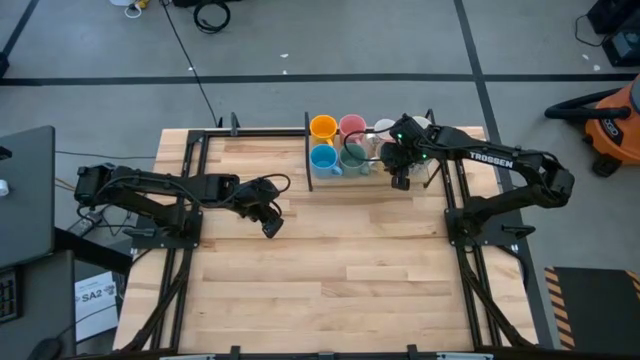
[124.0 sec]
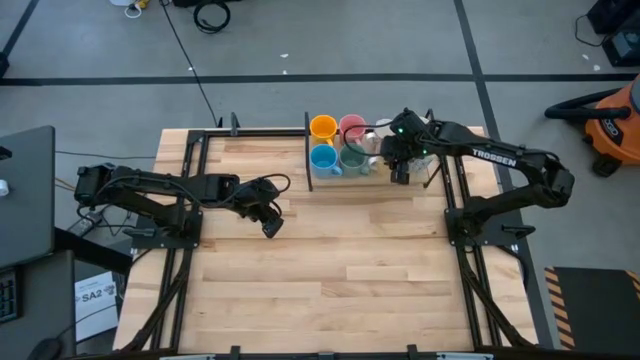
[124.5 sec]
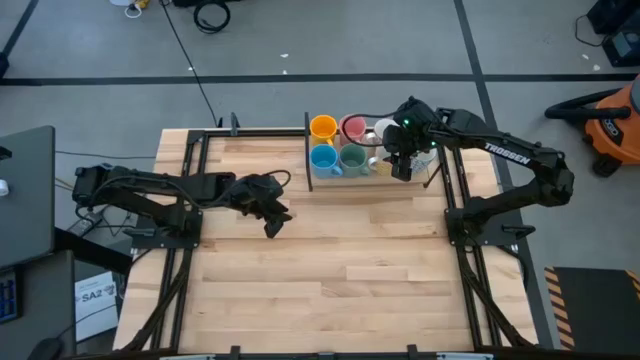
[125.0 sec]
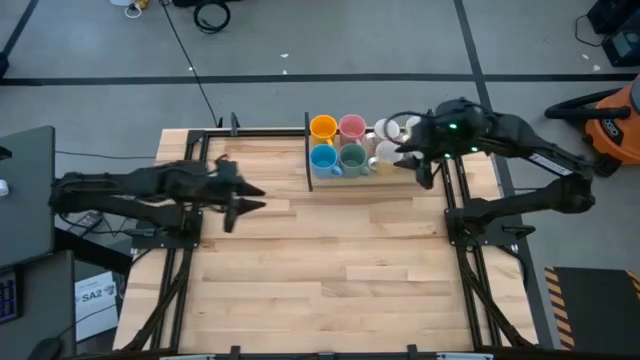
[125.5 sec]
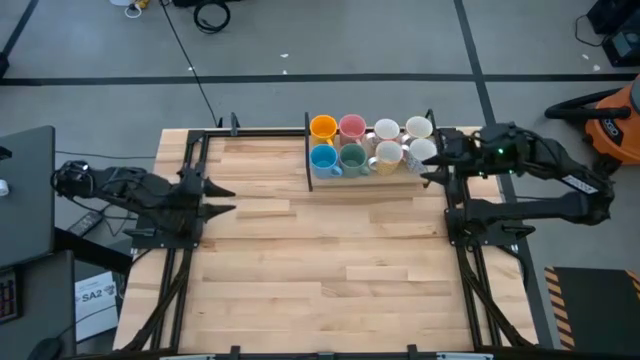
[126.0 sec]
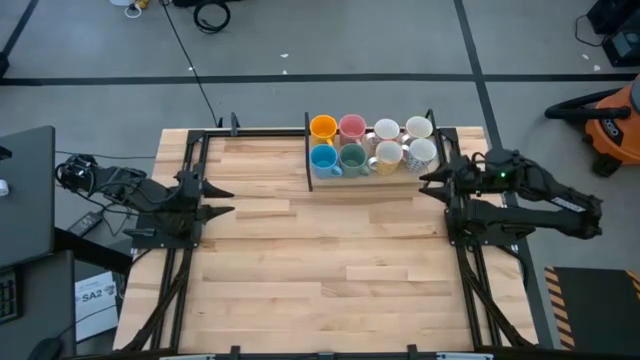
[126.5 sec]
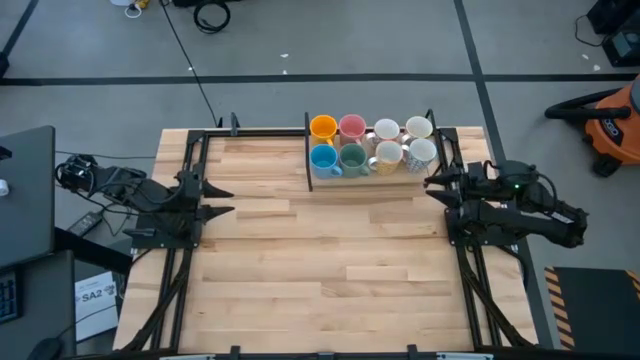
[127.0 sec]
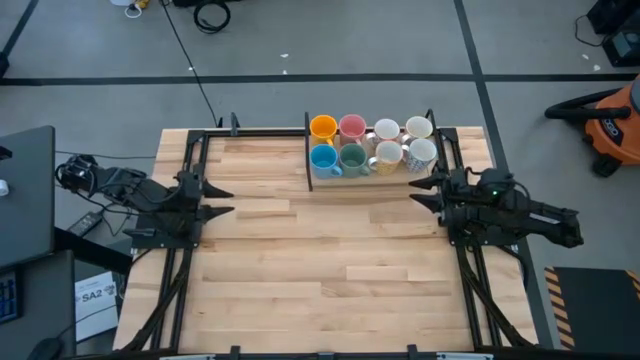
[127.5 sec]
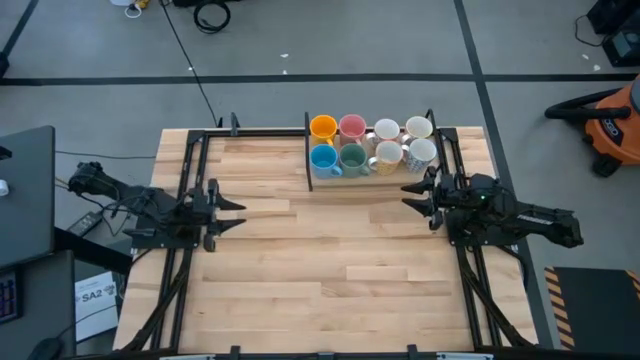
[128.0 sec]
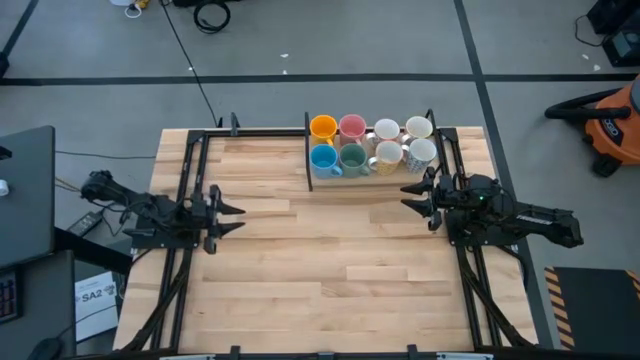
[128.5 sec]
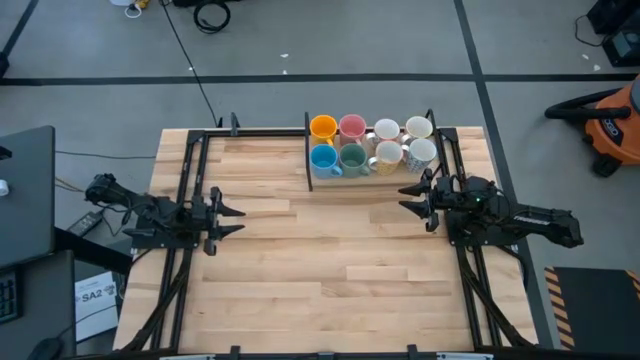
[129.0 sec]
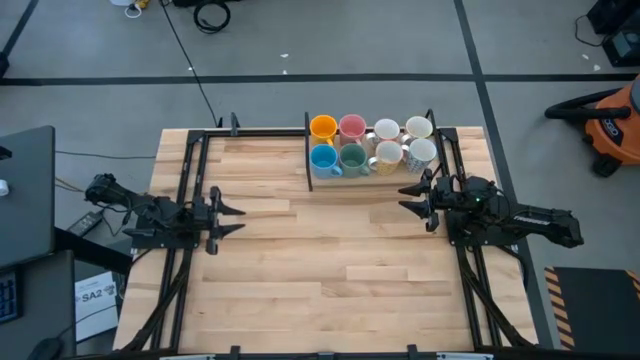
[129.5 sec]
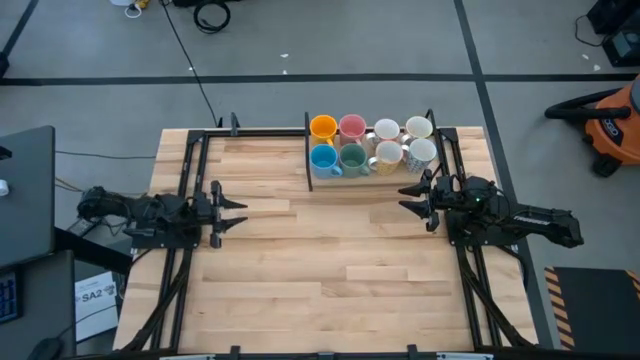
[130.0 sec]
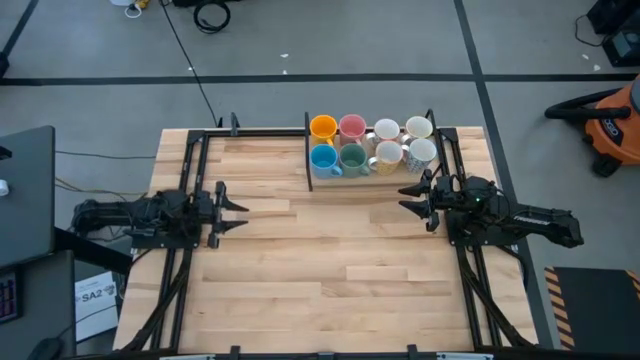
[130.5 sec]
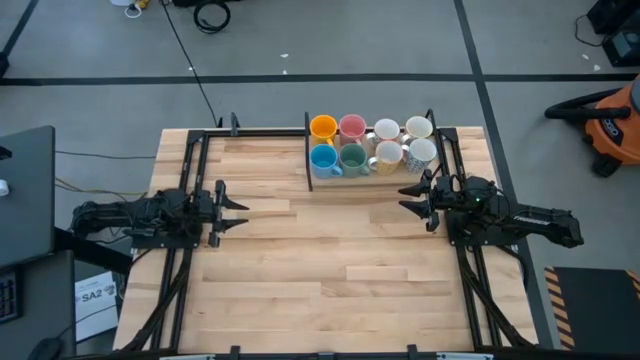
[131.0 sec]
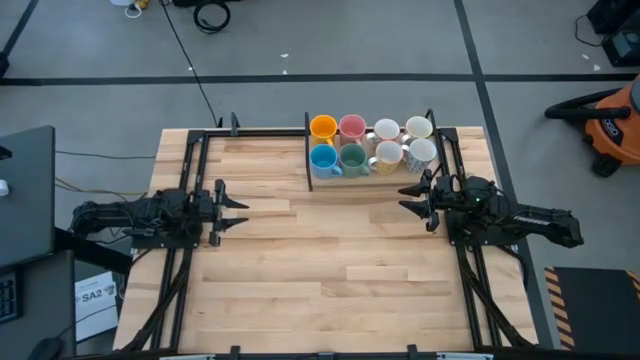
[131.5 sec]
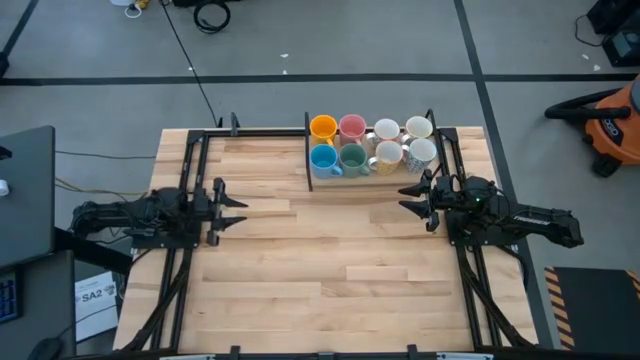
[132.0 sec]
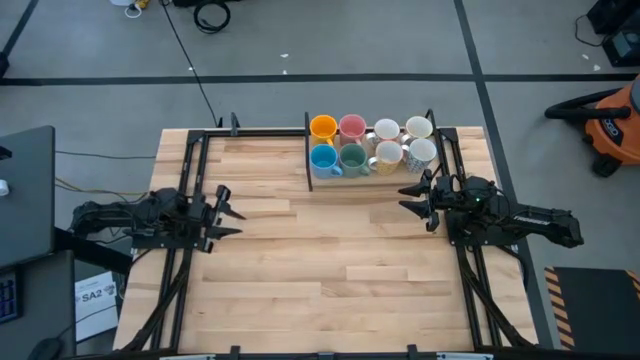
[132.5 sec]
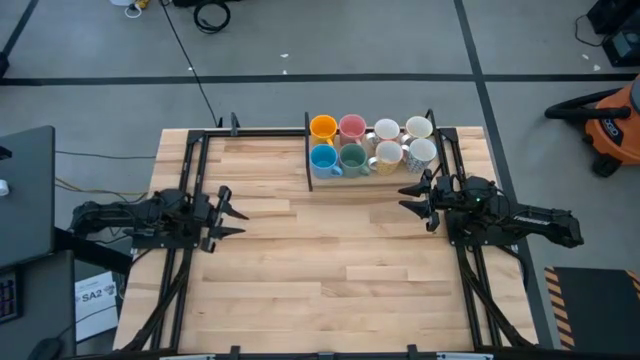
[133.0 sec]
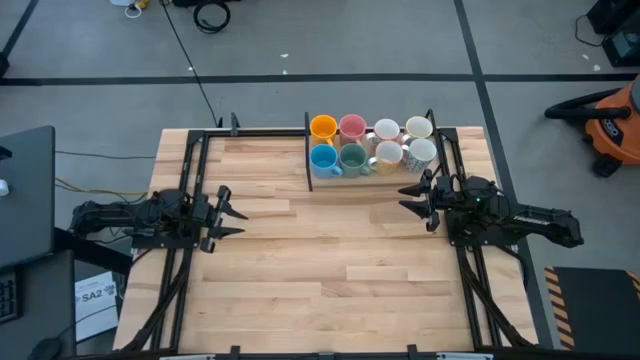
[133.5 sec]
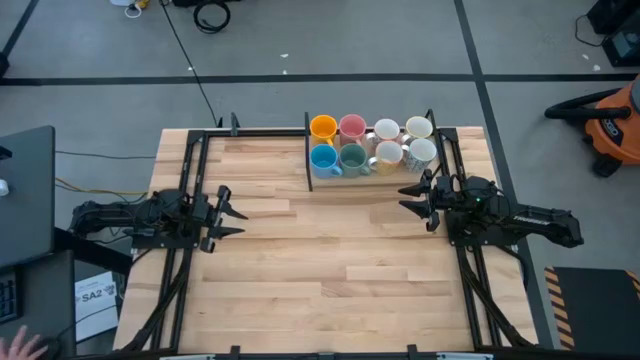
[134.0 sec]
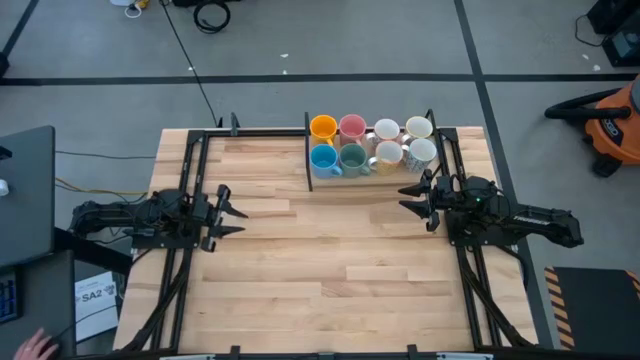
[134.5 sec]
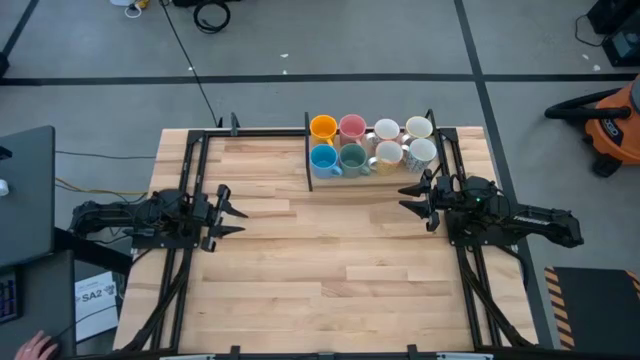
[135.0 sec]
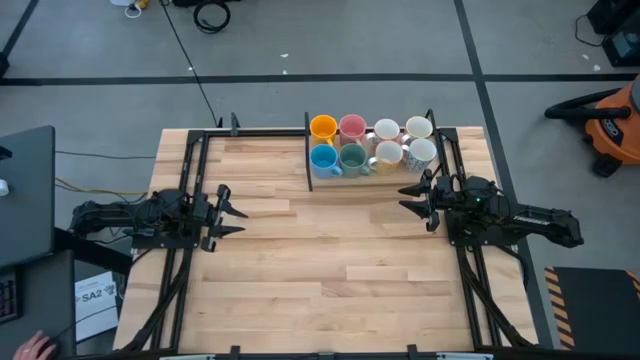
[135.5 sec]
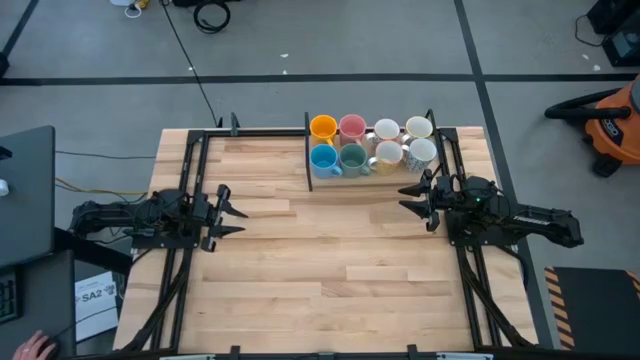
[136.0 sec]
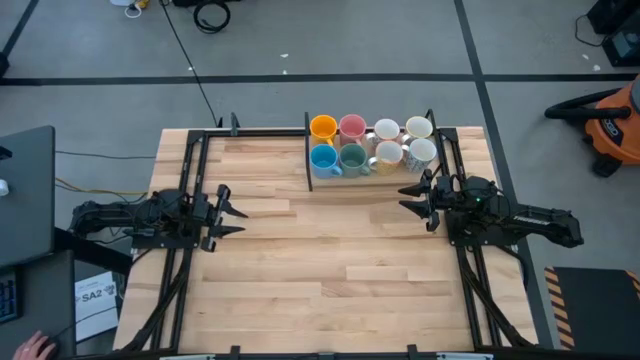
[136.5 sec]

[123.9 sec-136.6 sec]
Task: Place coffee mugs
Return to Home Position

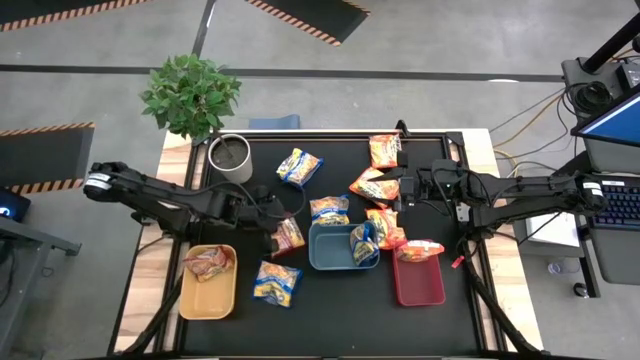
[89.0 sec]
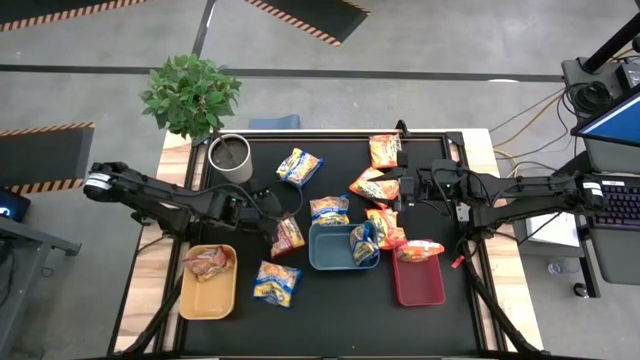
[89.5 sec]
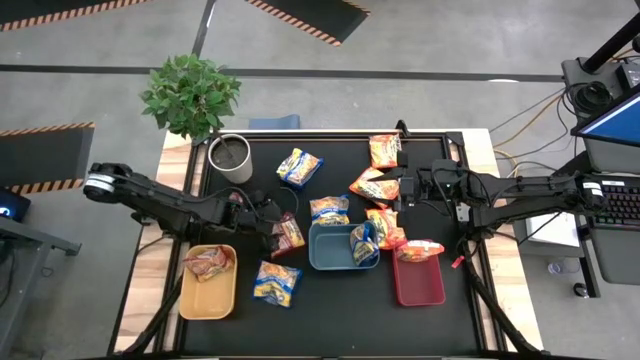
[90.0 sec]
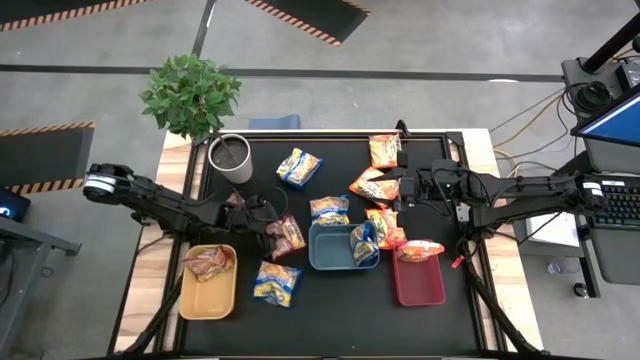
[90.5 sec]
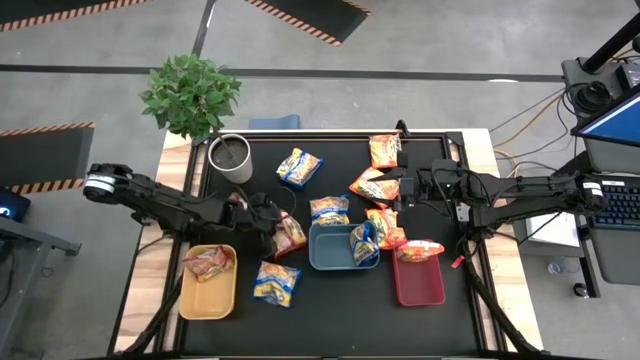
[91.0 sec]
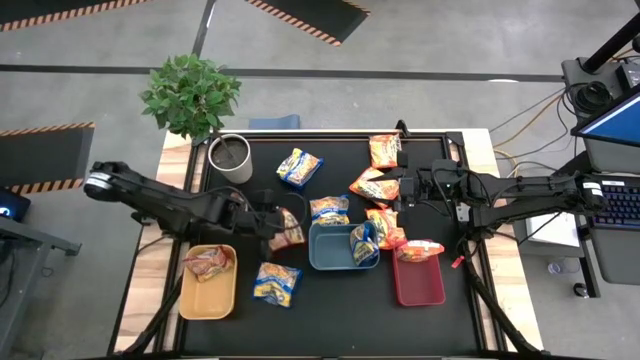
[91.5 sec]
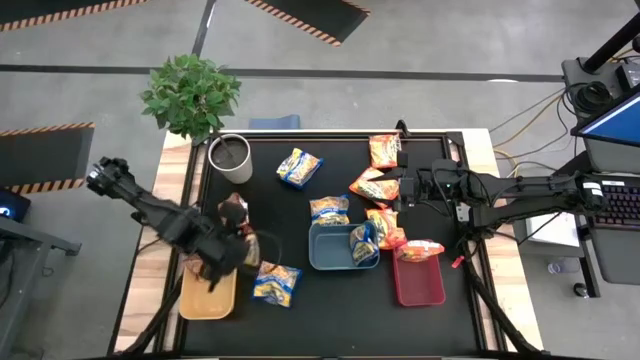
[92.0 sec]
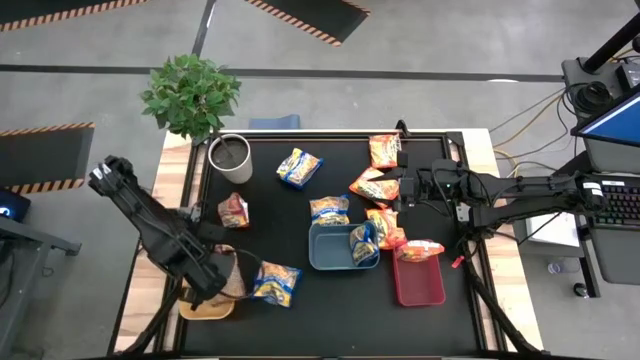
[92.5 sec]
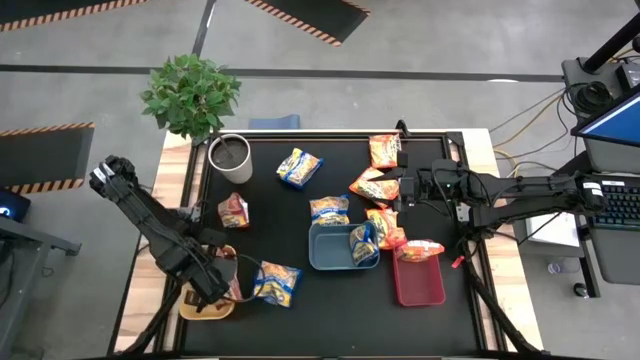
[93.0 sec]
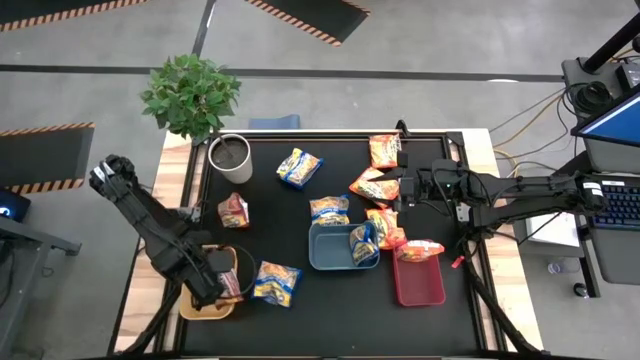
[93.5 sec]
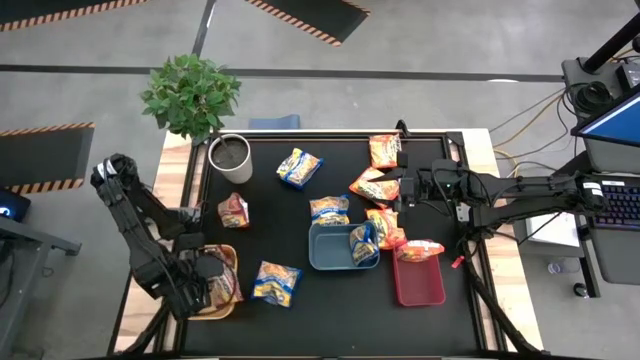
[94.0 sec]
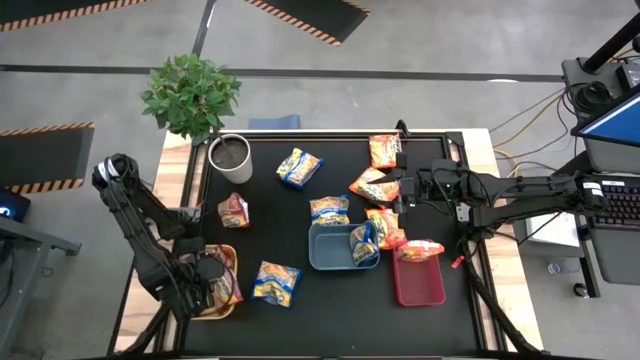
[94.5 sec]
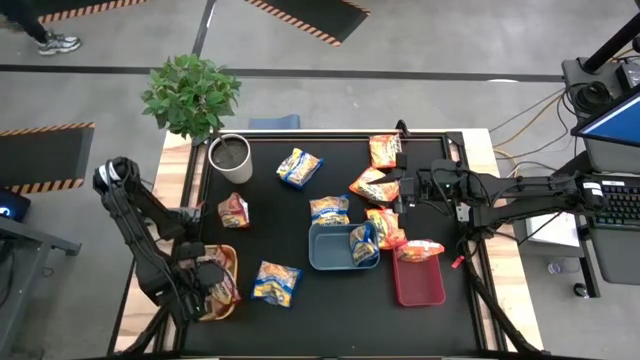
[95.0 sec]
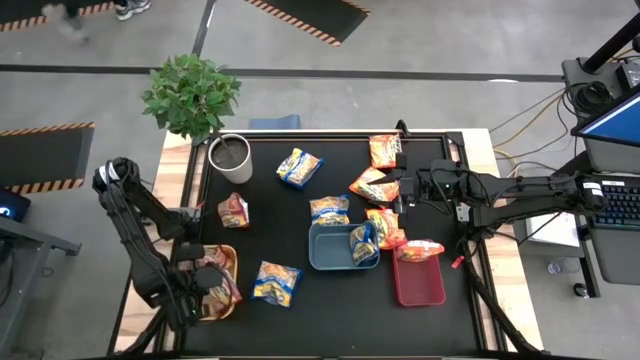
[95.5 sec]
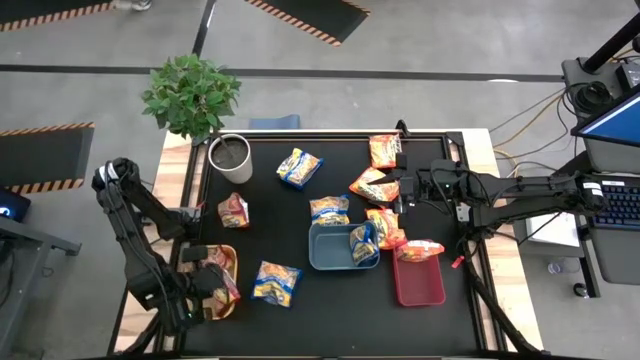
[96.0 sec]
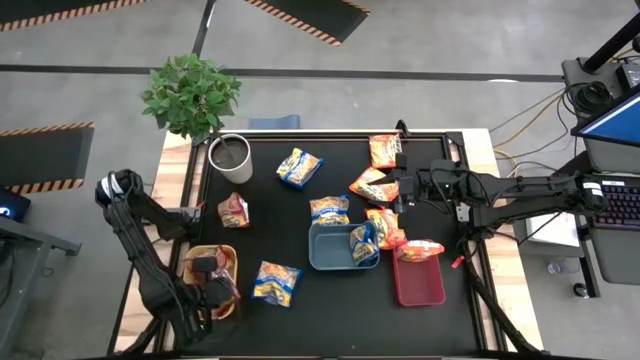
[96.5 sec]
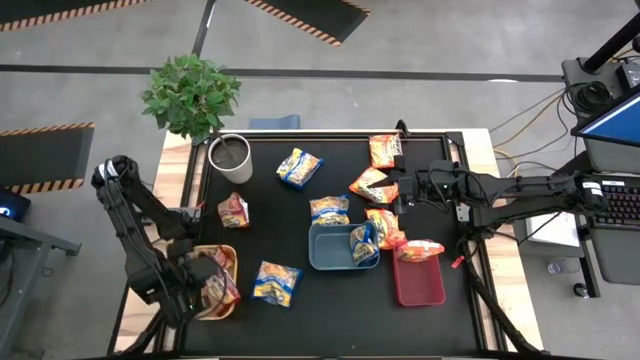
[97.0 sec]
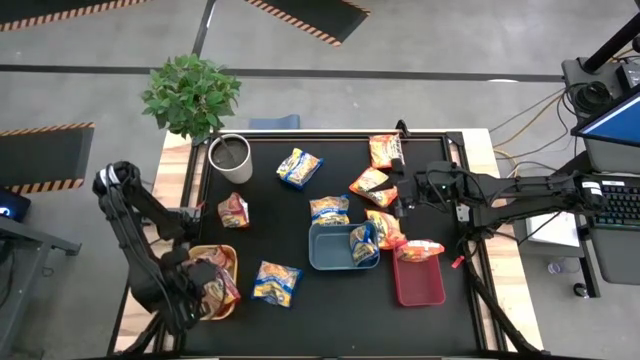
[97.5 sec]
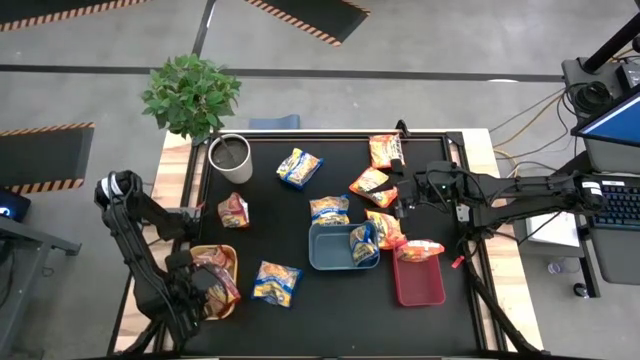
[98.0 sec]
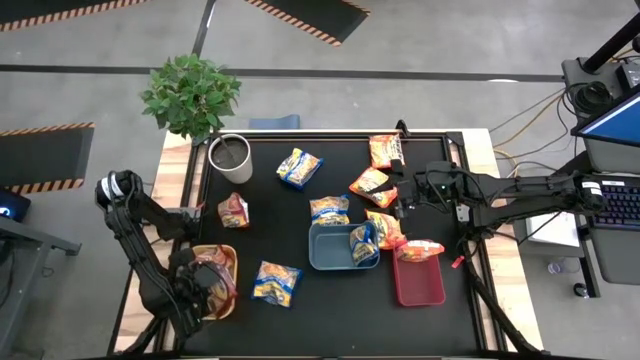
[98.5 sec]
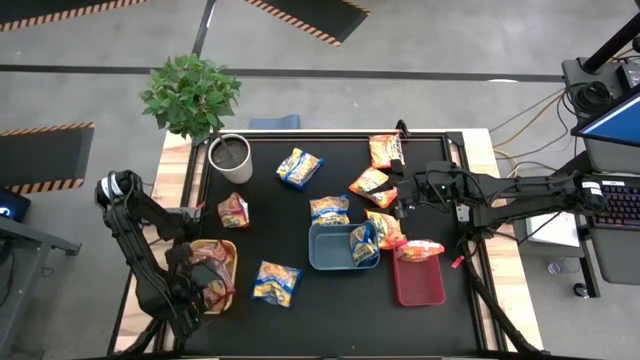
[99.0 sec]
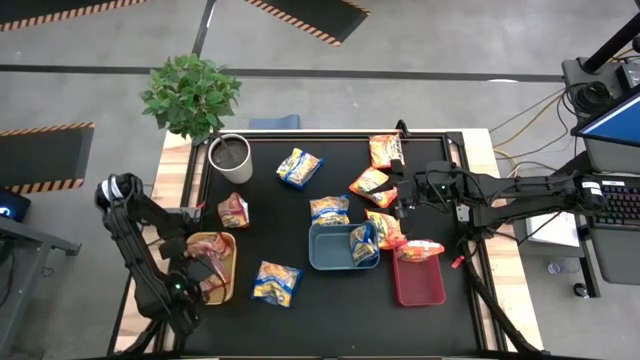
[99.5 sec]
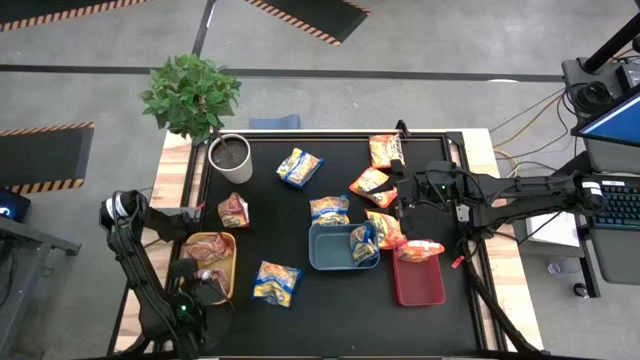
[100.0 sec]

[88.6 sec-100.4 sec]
Task: Sort Maruchan noodles
Put the right red noodle pack into the yellow bin
